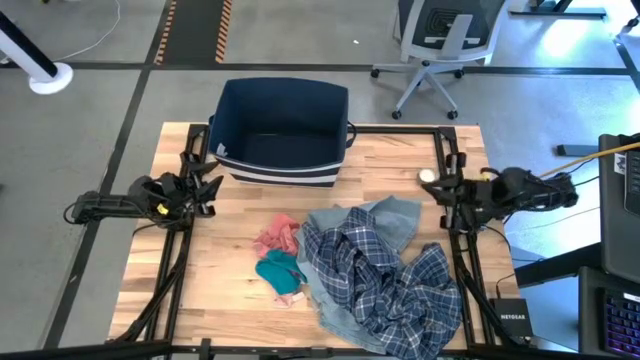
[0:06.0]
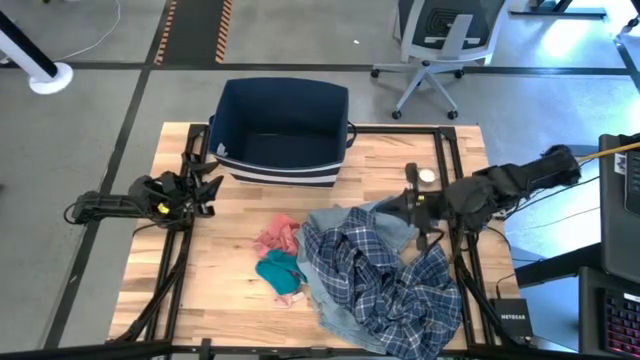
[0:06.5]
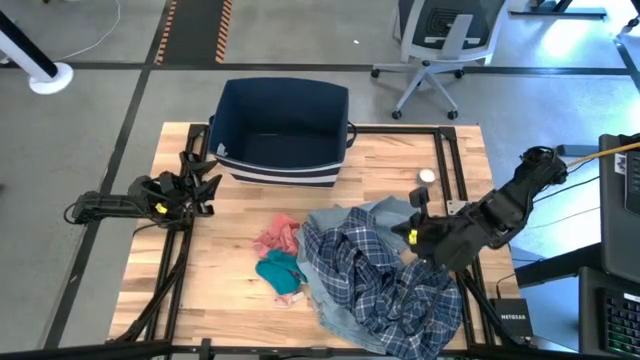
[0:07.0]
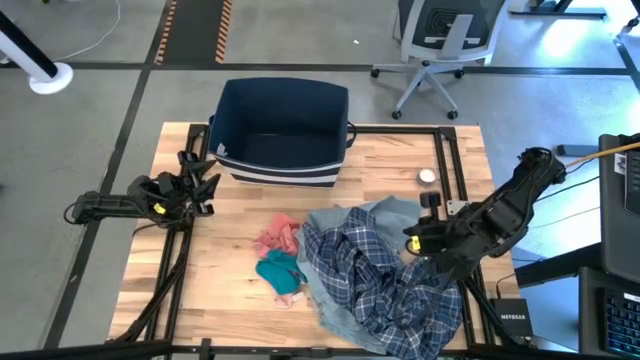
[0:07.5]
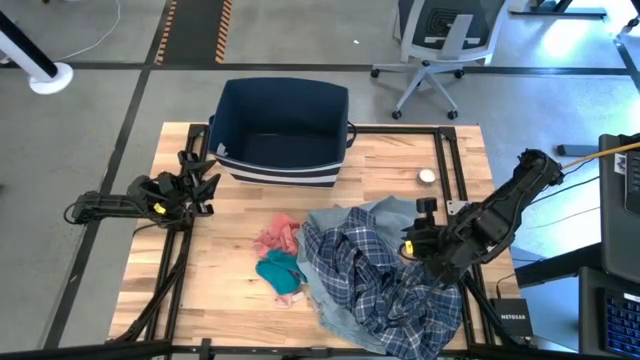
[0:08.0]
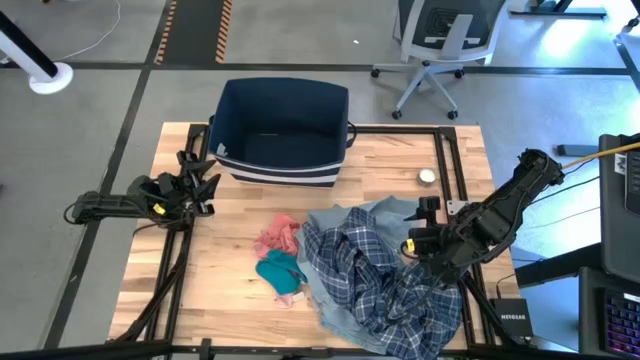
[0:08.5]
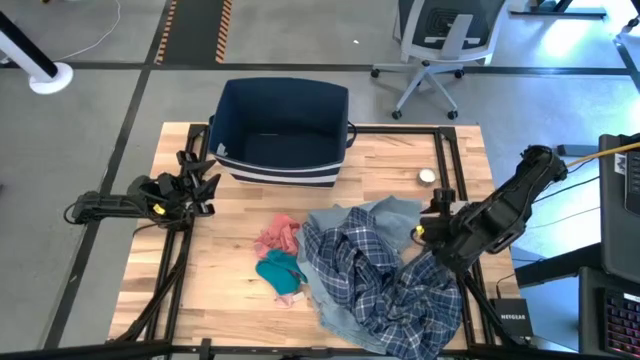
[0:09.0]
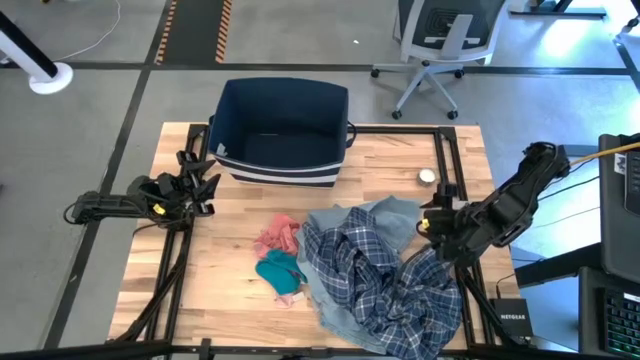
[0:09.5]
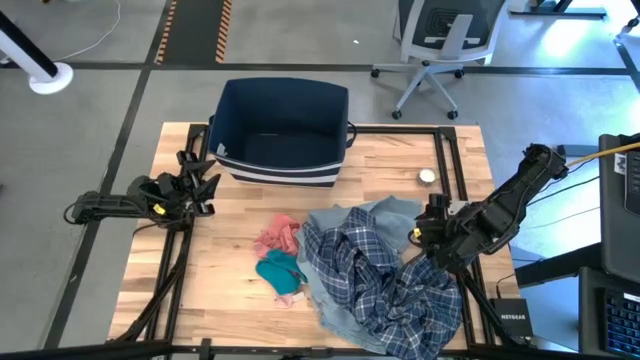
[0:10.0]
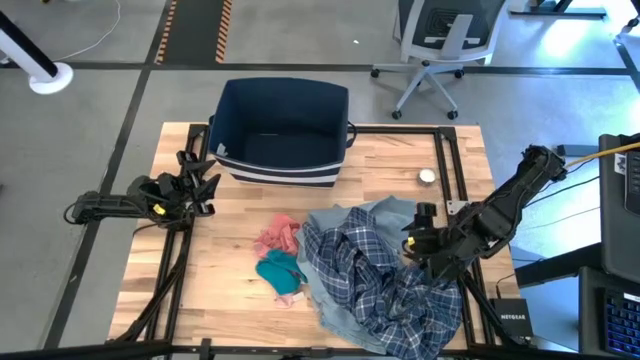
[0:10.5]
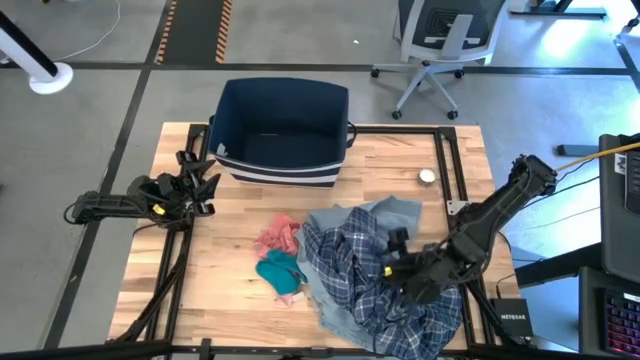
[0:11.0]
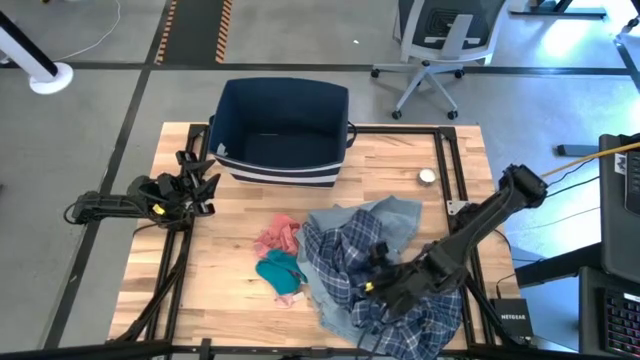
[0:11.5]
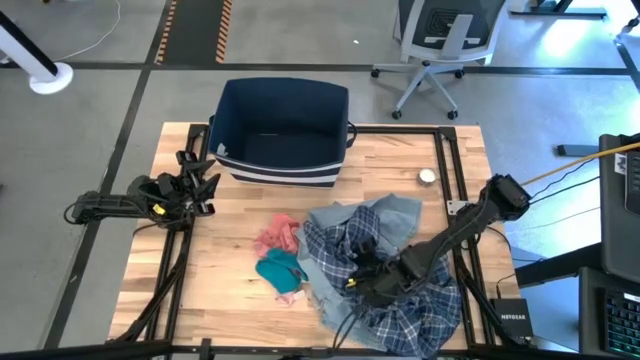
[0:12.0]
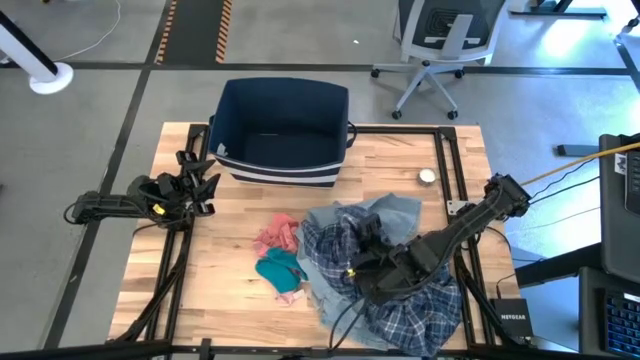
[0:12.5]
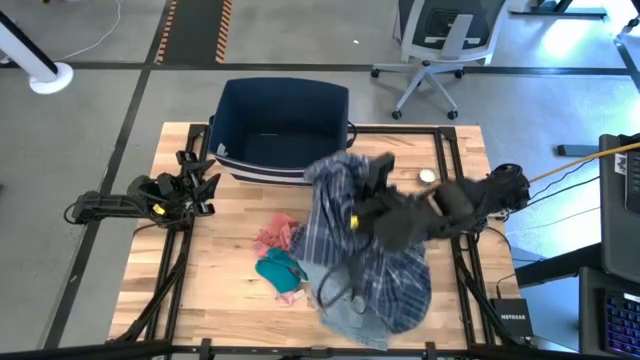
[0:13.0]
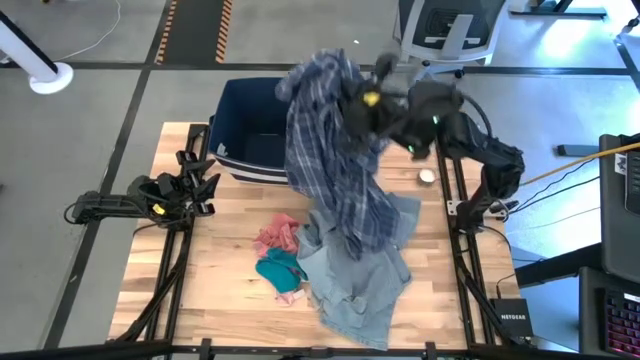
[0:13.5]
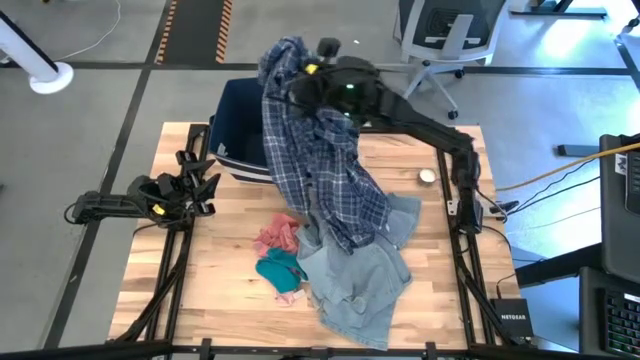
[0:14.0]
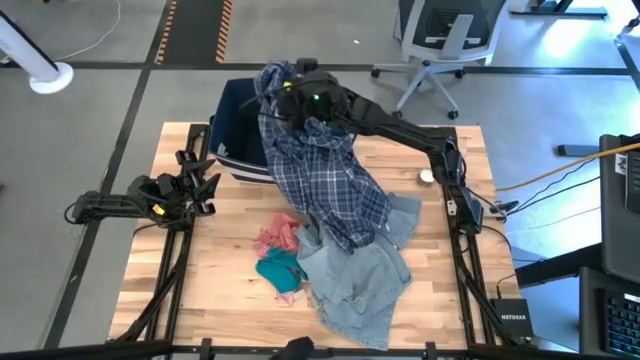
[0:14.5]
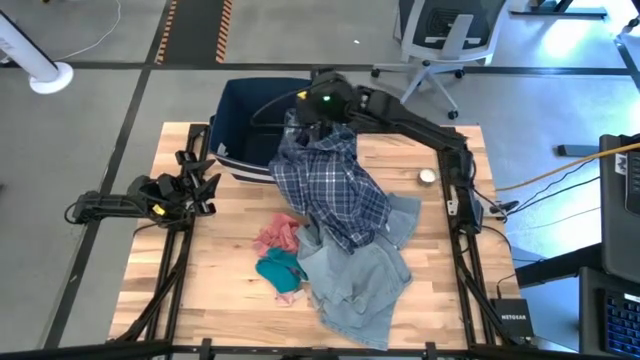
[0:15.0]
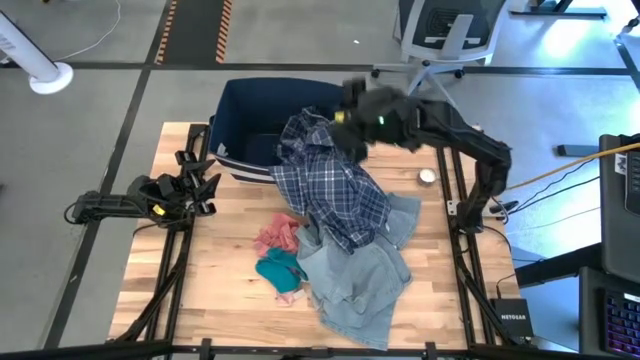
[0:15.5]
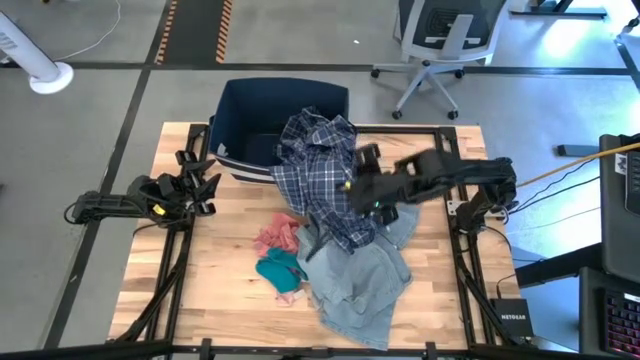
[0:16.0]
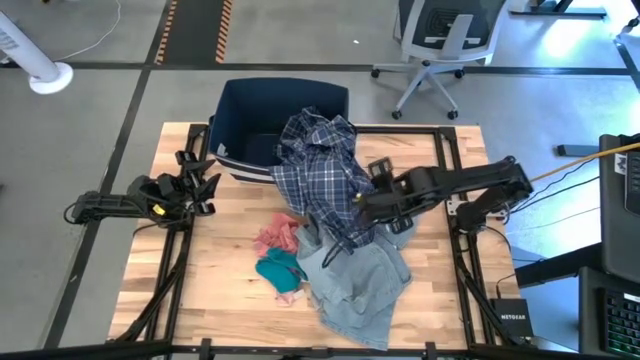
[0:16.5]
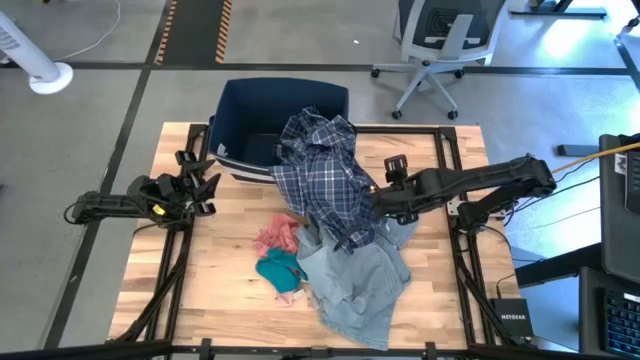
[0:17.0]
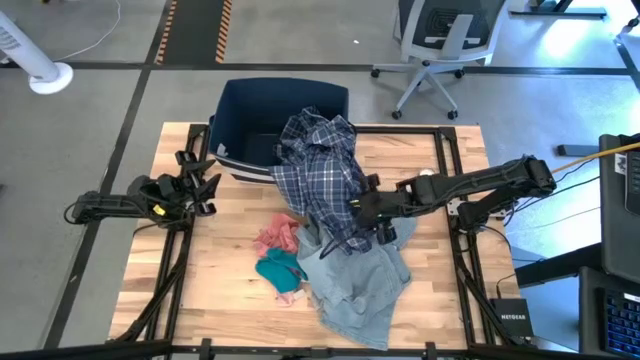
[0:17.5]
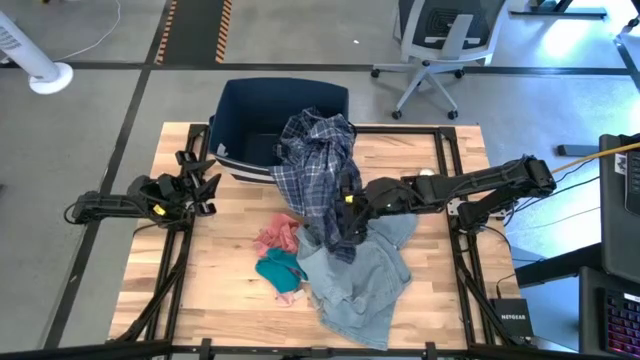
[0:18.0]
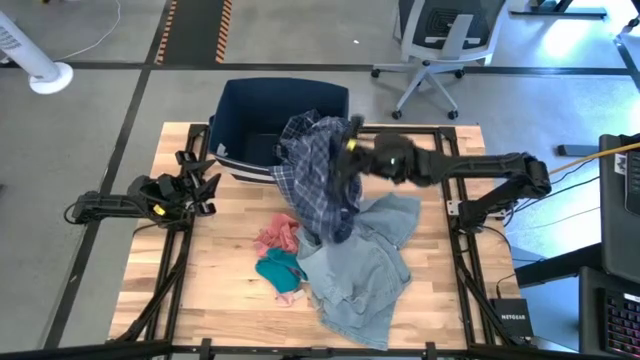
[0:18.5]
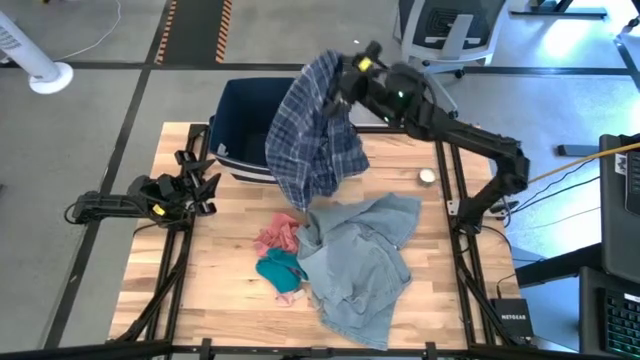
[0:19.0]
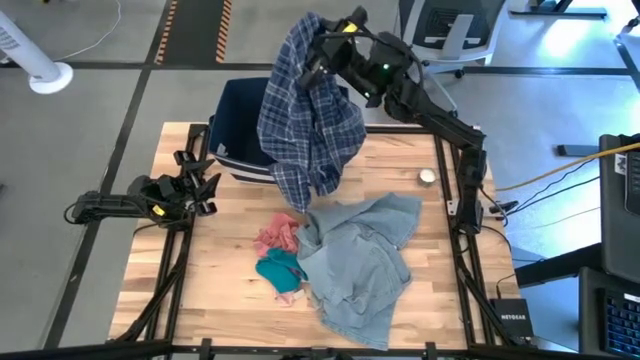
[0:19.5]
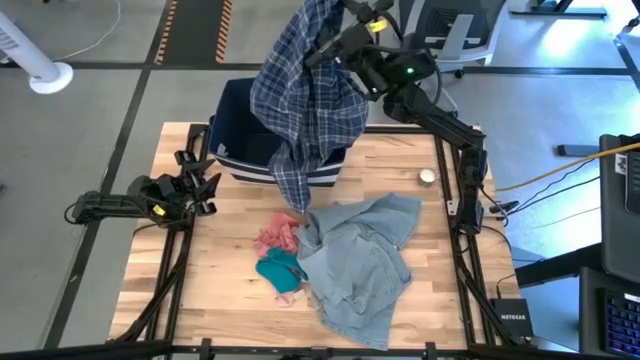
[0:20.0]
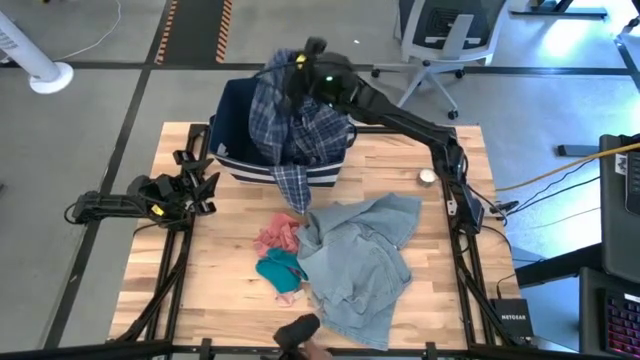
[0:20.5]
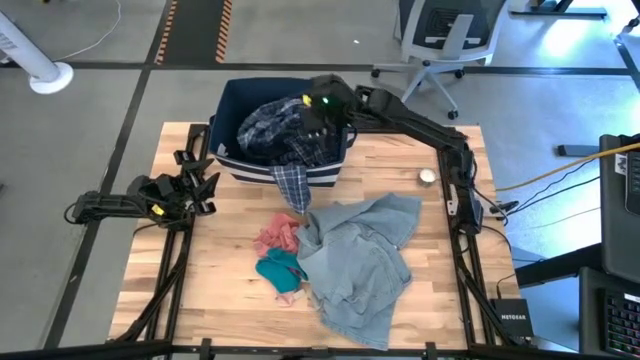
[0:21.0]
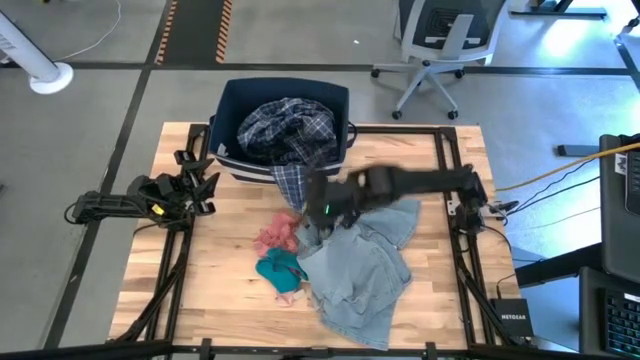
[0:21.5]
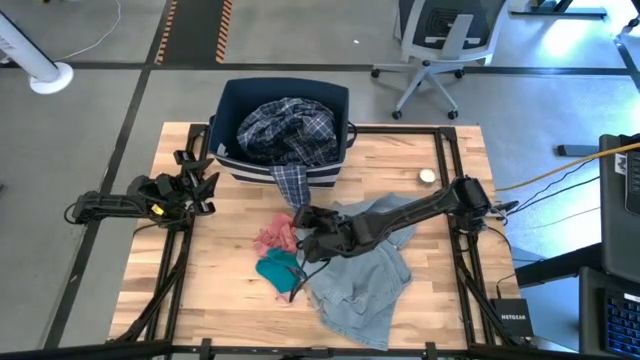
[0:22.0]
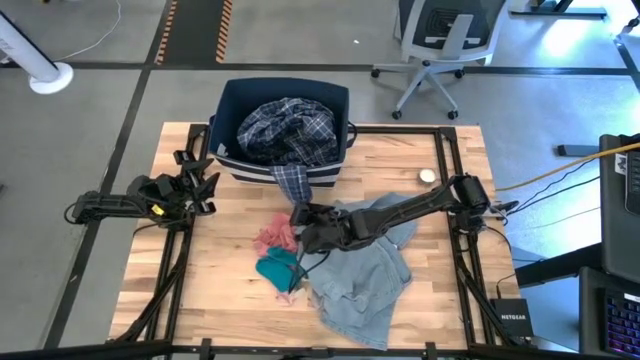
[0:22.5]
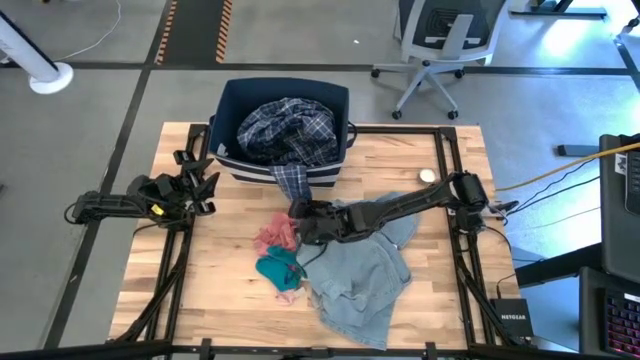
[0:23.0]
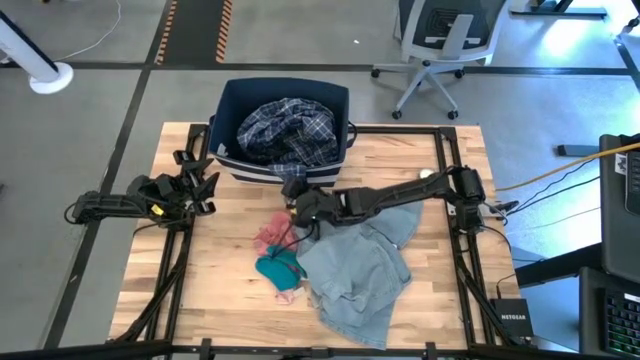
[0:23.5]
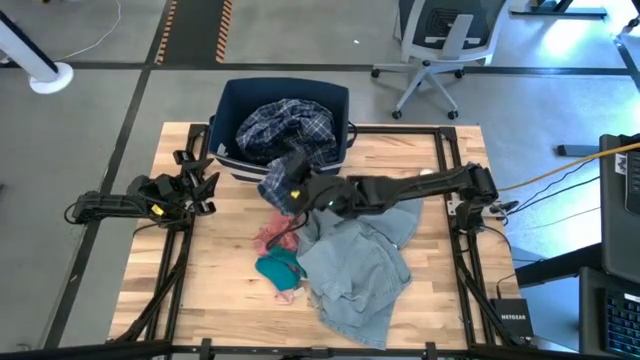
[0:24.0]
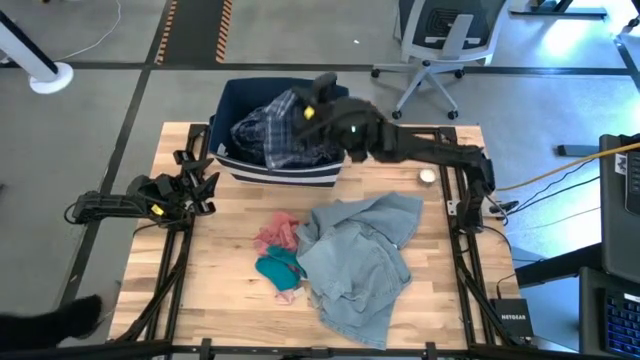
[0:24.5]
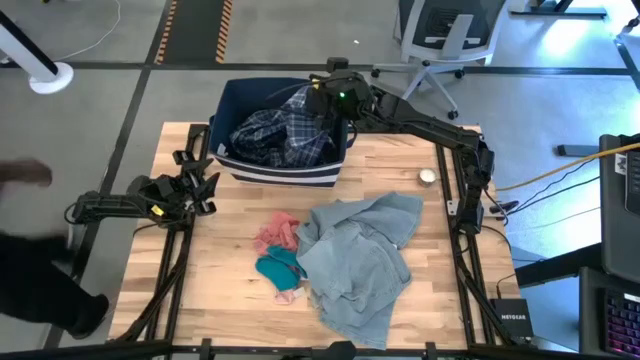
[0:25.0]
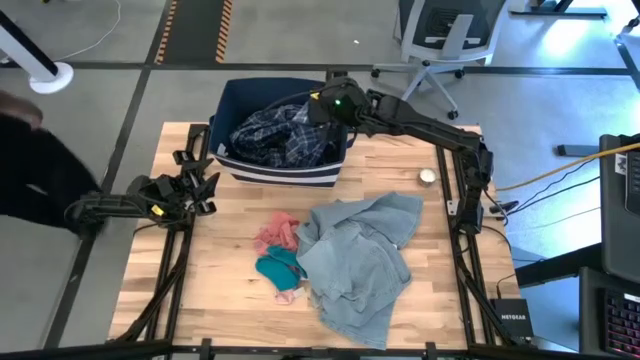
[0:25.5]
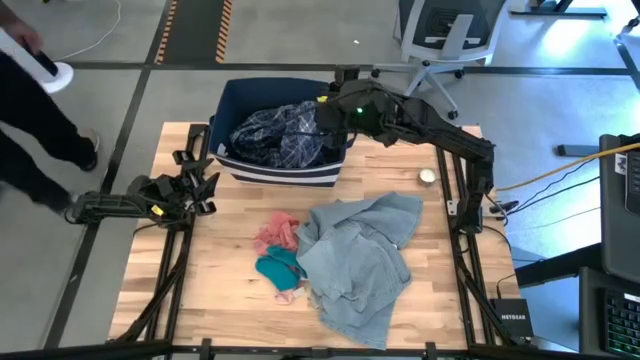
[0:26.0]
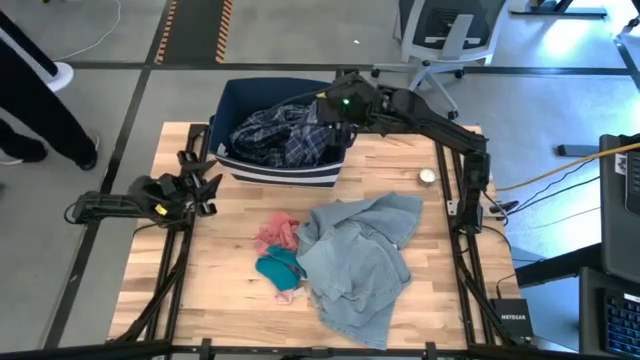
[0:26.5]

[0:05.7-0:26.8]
Task: Sort clothes
Put the blue checkered polo into the blue laundry organizer
